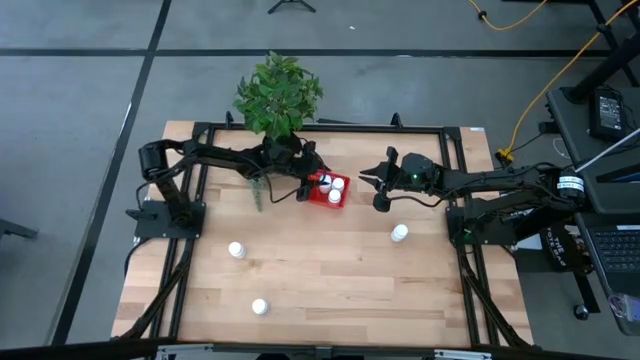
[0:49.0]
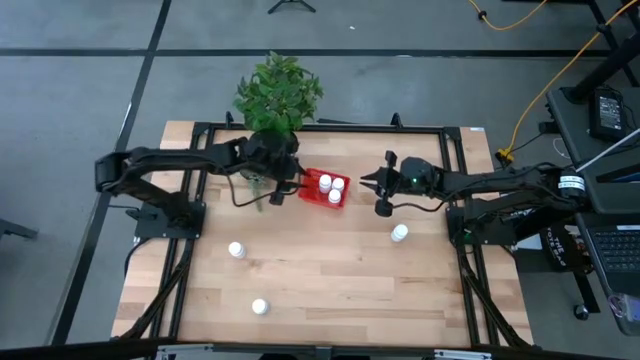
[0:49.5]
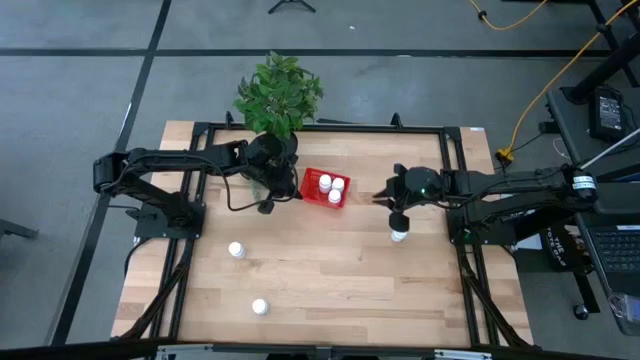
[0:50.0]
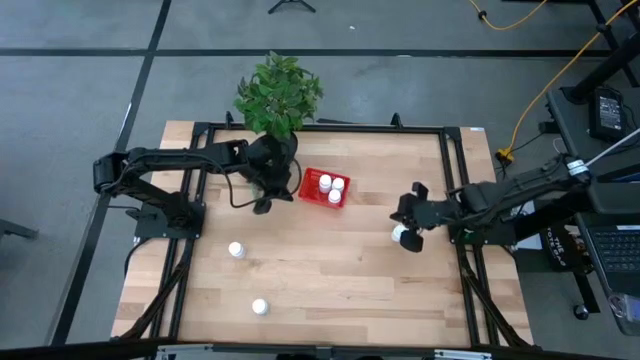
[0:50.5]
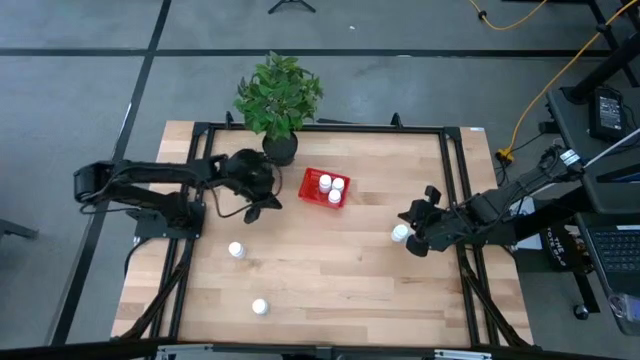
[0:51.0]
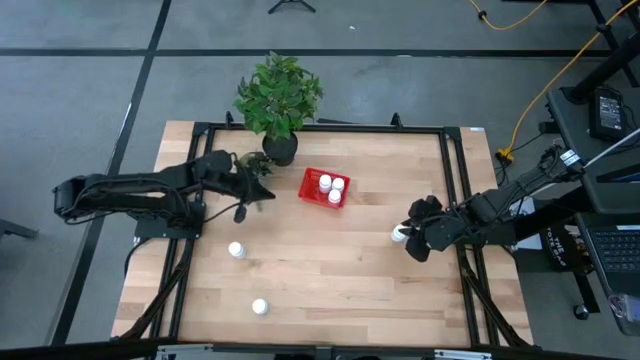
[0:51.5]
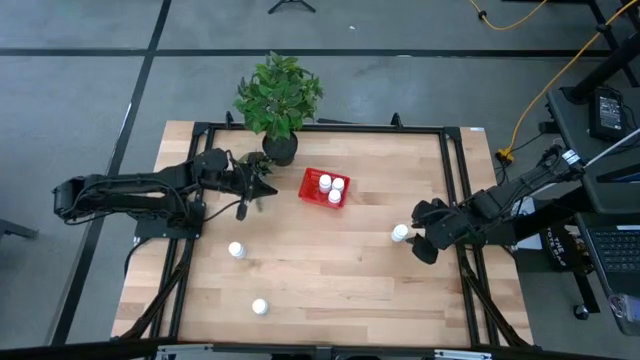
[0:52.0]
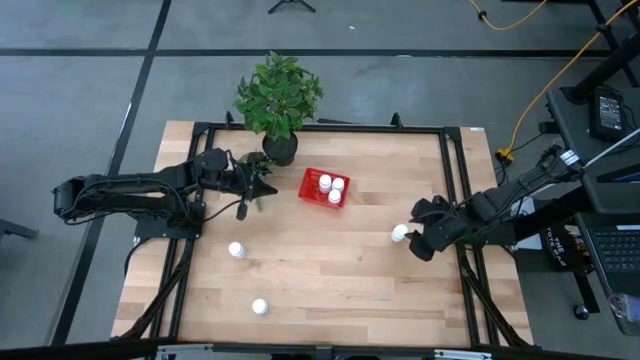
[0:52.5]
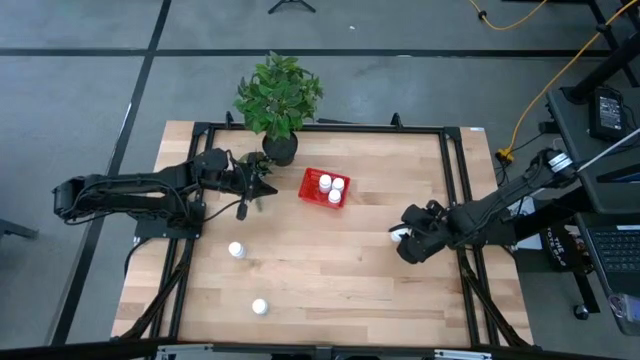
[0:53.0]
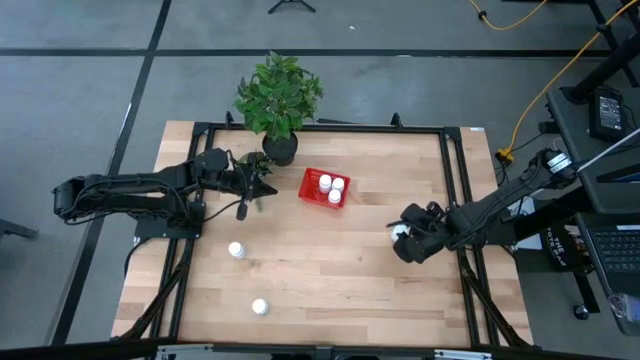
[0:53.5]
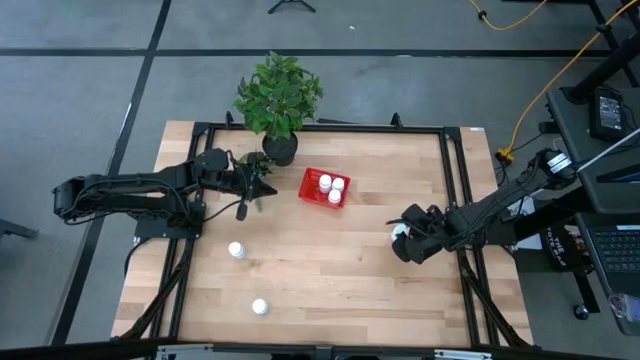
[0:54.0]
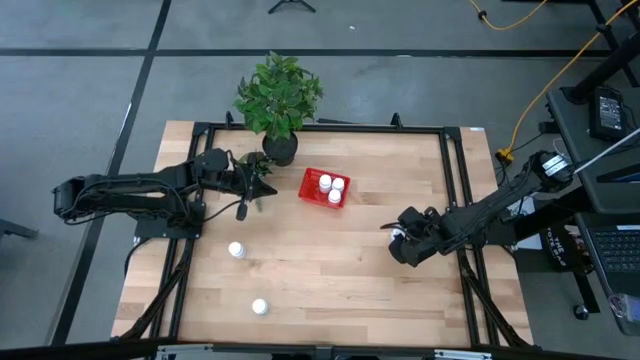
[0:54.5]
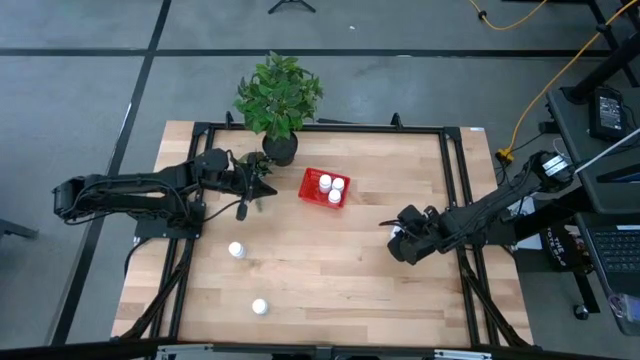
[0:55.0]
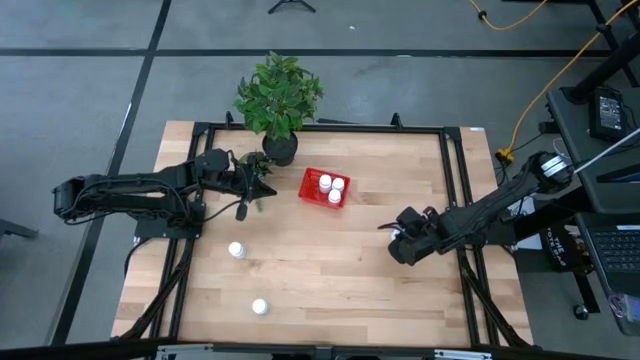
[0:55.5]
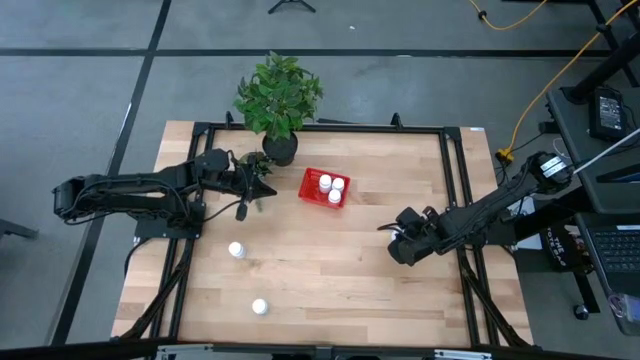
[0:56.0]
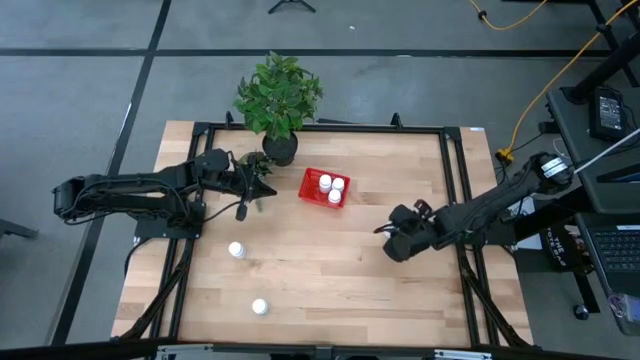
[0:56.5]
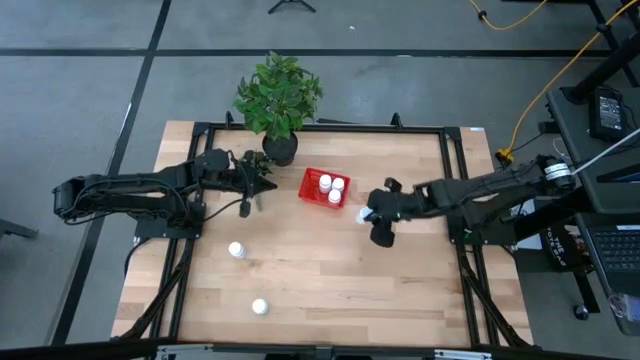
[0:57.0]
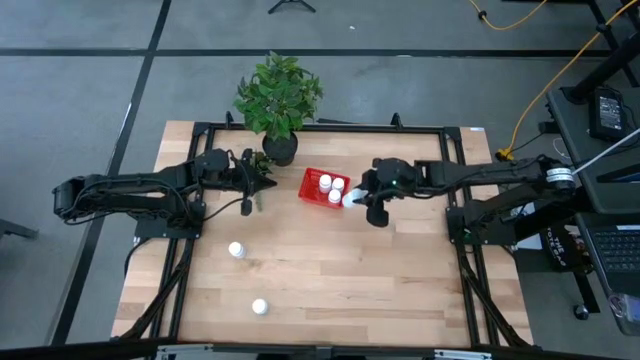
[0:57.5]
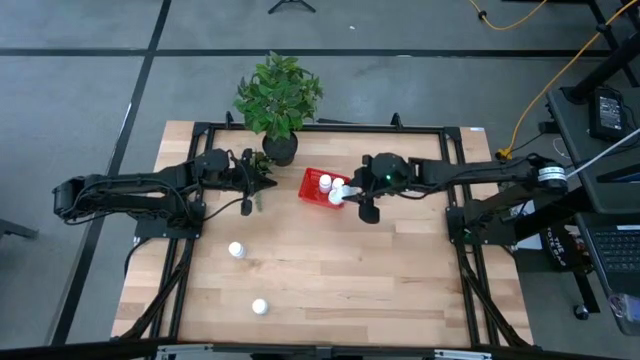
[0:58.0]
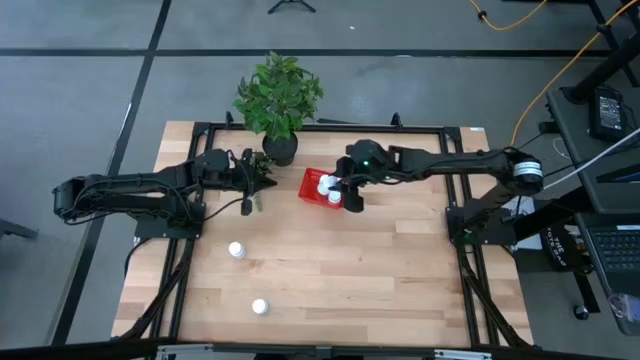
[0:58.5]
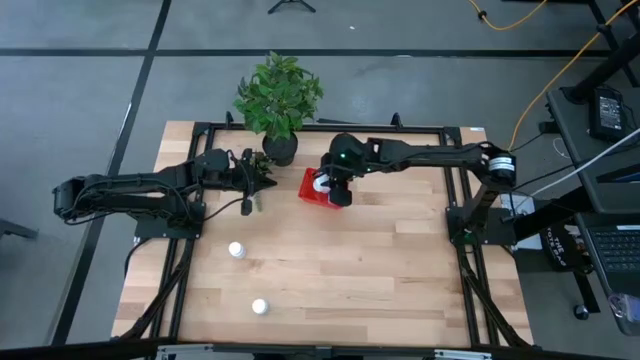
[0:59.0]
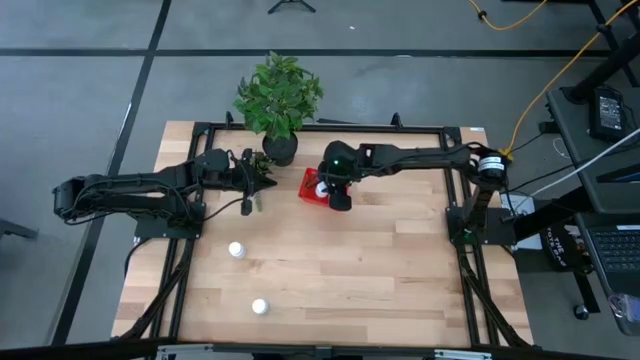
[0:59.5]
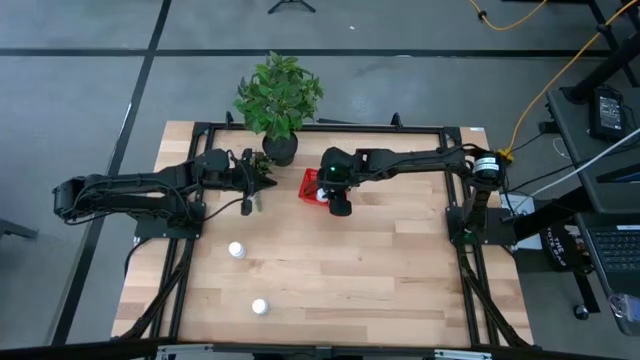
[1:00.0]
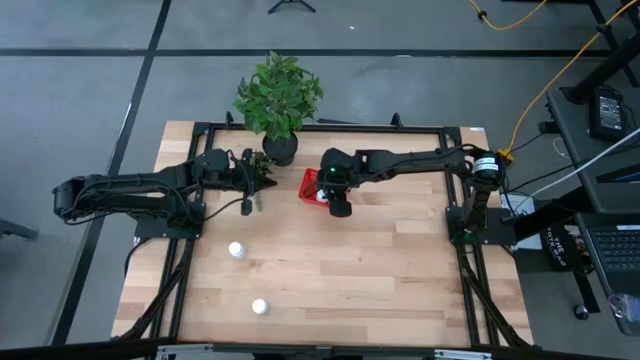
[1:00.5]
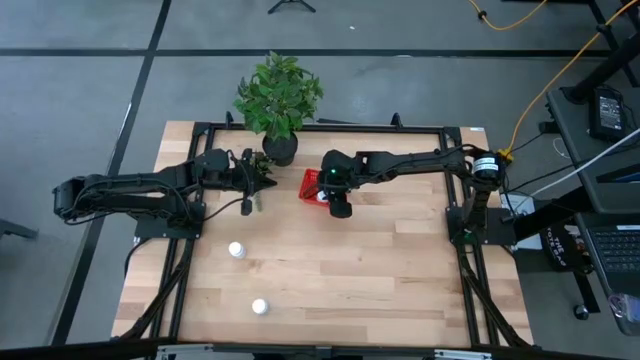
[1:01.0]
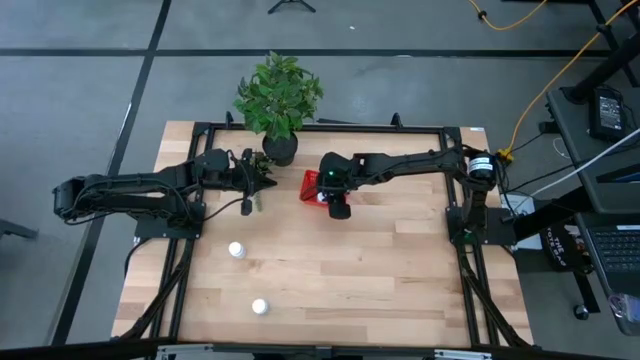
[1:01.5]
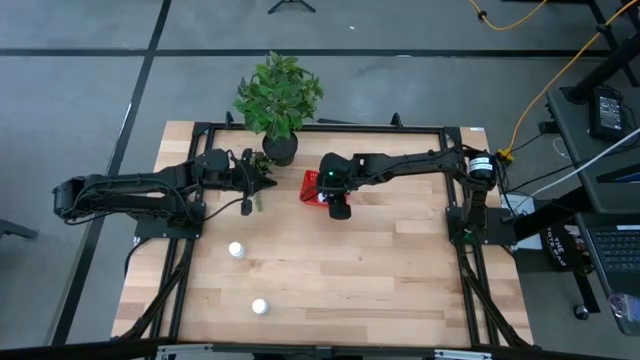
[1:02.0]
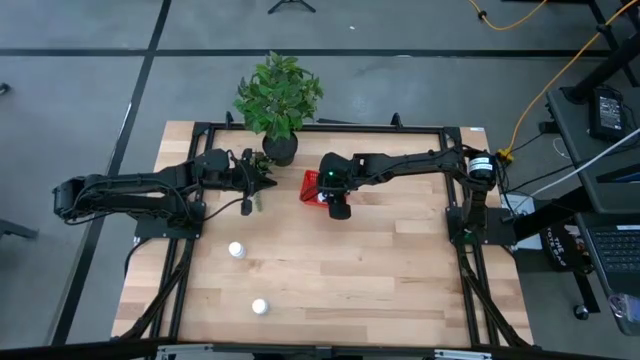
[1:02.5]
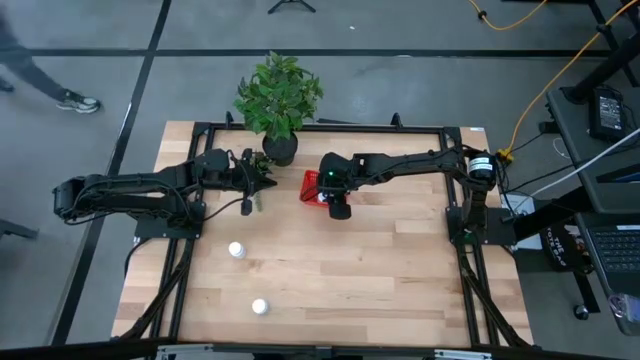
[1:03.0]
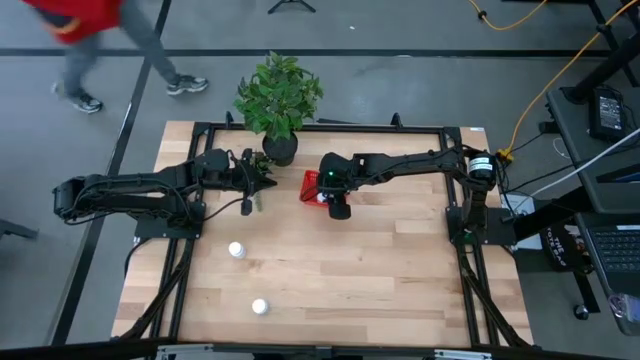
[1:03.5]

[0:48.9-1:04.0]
Task: Pick and place pill bottles into a basket
Put the white medicine bottle into the red bin

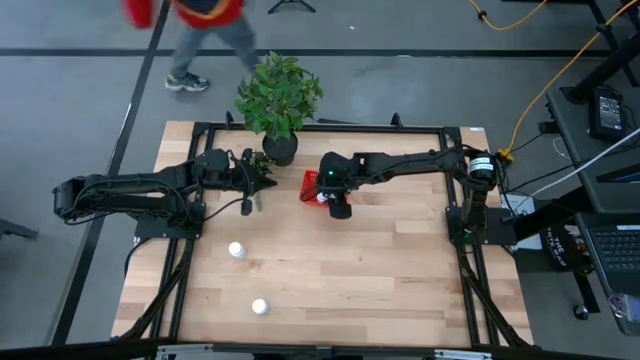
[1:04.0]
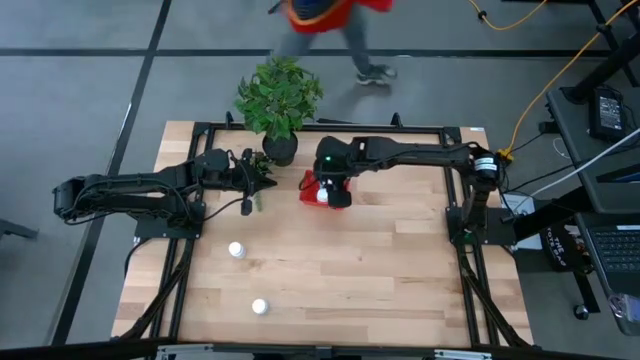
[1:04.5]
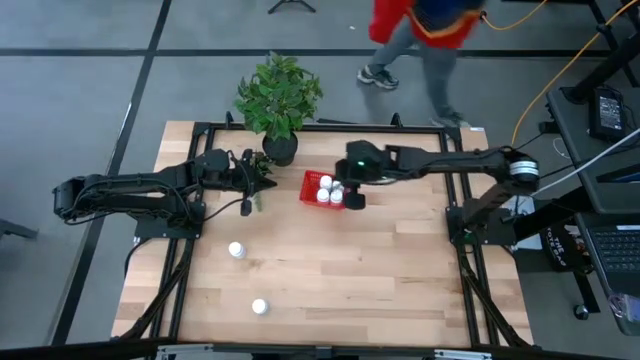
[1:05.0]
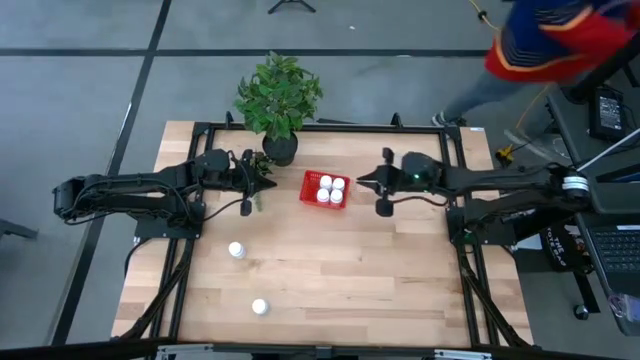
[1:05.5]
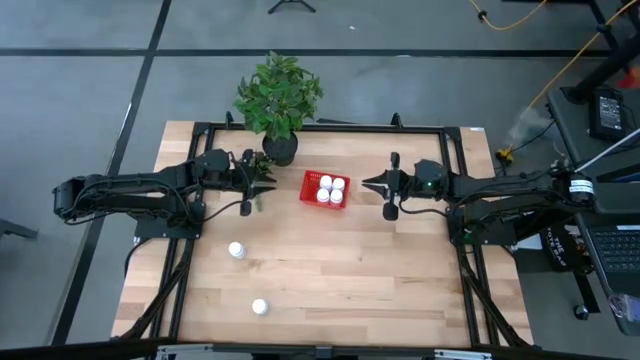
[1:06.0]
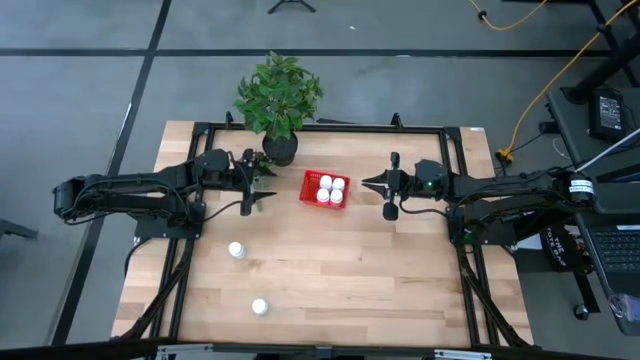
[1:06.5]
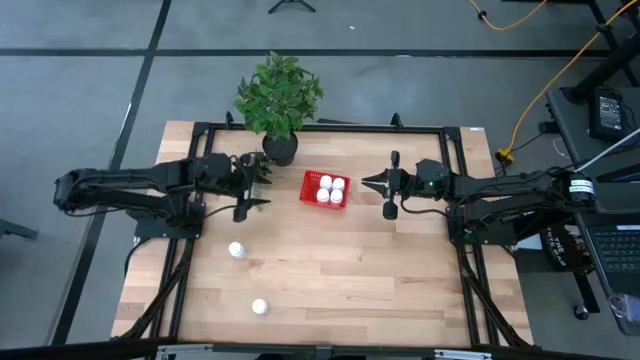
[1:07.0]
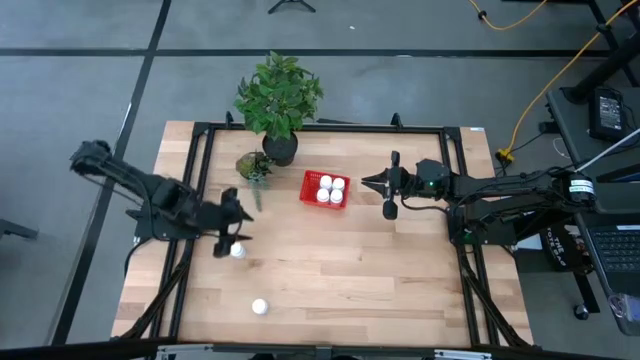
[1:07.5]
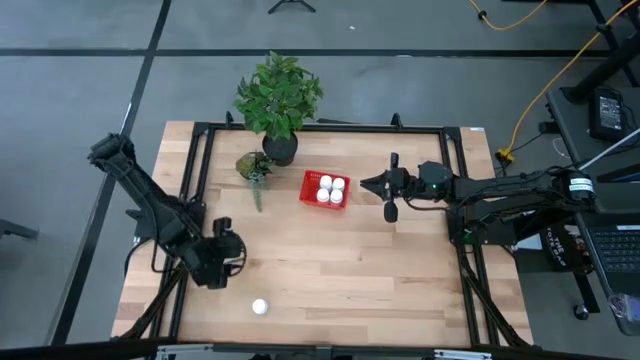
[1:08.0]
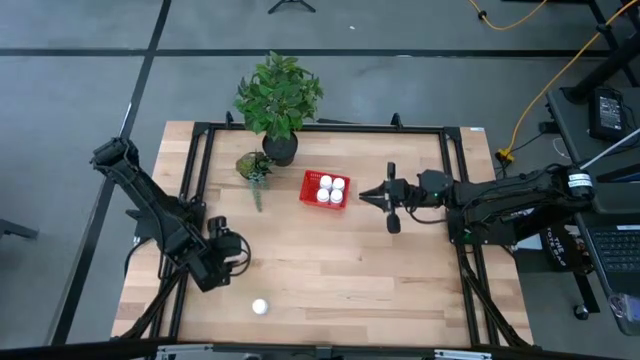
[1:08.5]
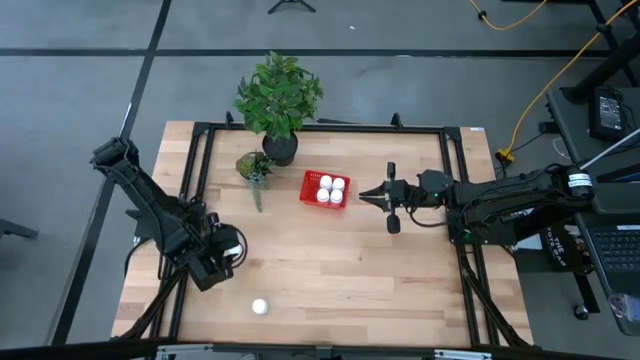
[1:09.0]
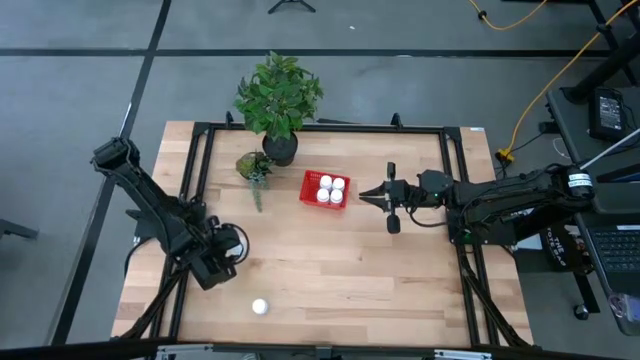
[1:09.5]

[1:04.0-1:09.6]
Put the white medicine bottle into the red bin

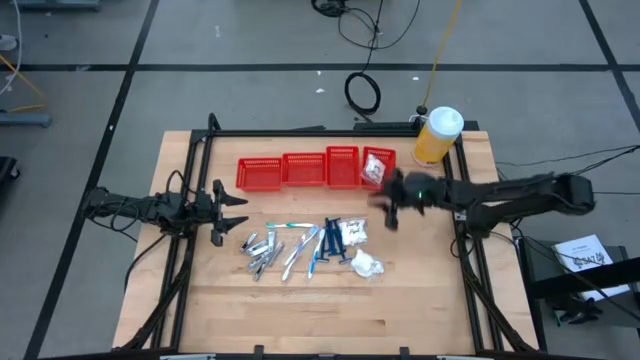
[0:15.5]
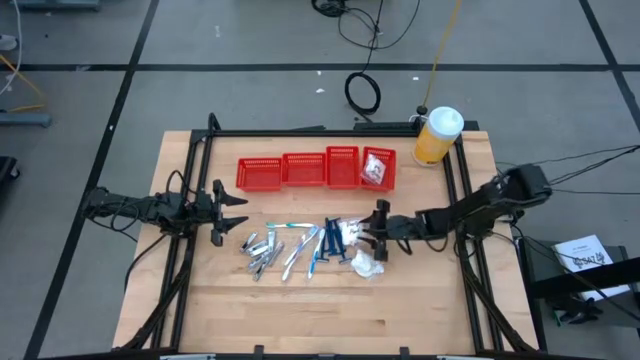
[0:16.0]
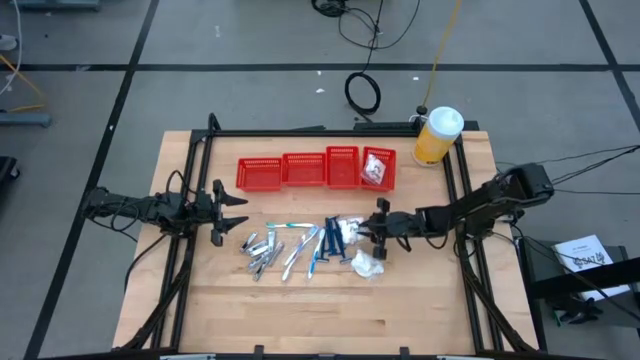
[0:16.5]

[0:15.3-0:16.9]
Task: Pick & Place Travel size toiletries
Put the top vanity pack into the vertical right red bin
